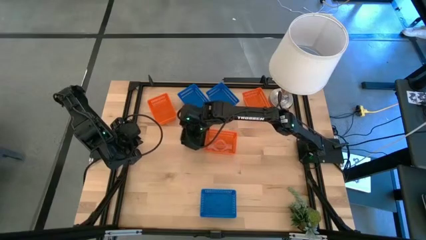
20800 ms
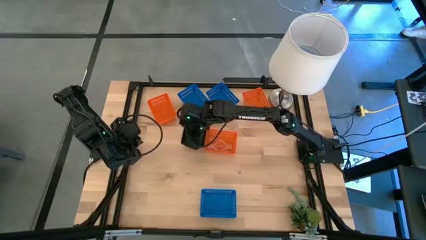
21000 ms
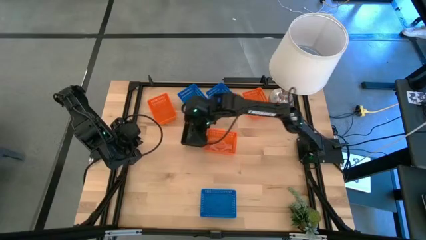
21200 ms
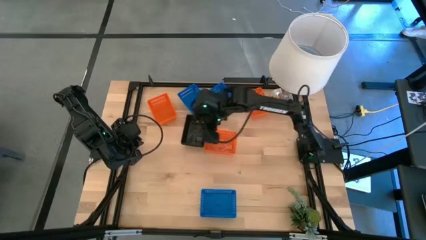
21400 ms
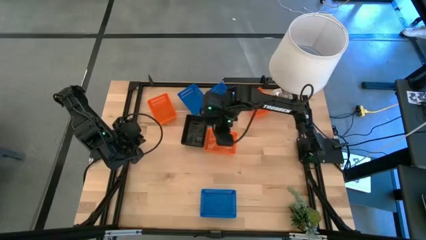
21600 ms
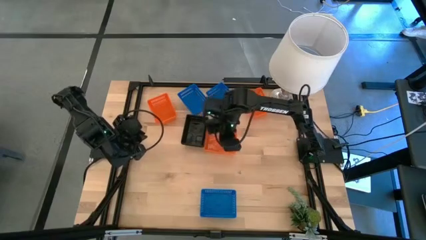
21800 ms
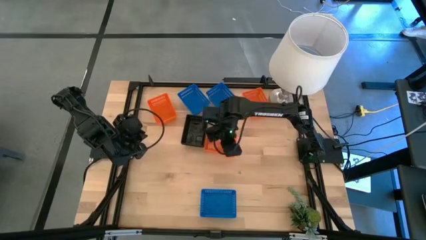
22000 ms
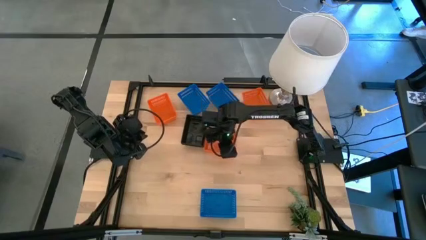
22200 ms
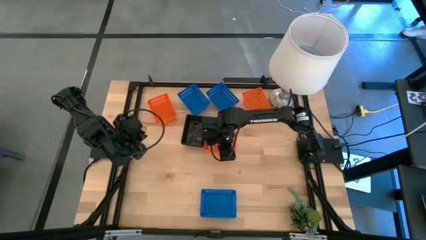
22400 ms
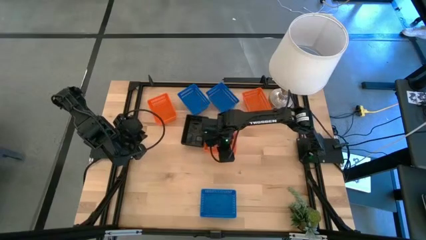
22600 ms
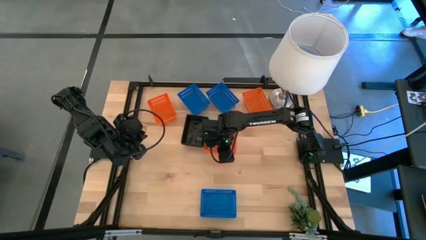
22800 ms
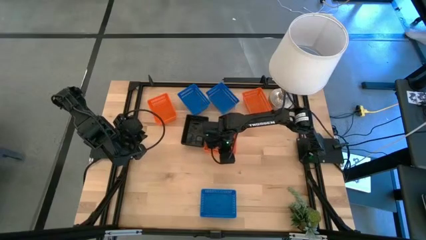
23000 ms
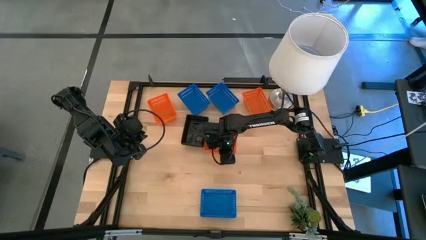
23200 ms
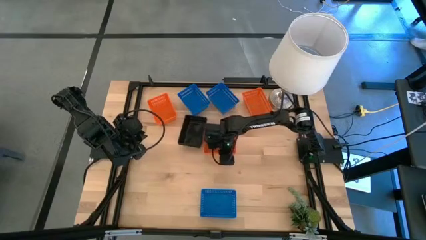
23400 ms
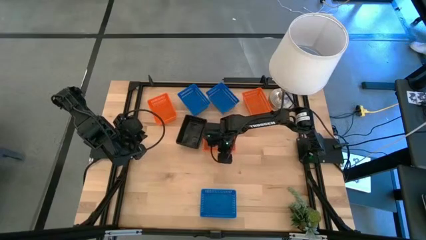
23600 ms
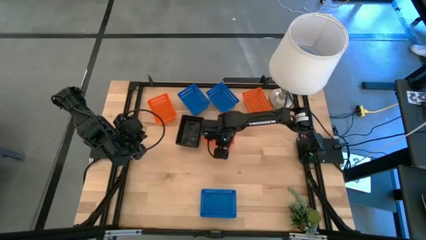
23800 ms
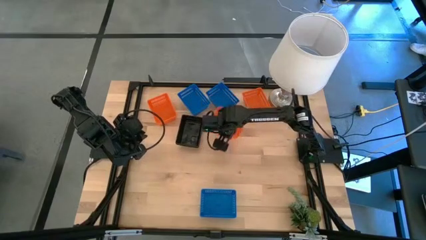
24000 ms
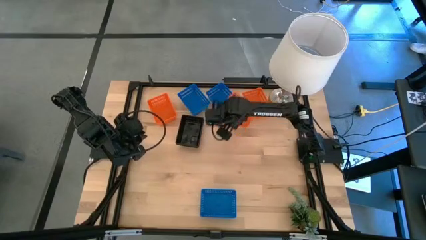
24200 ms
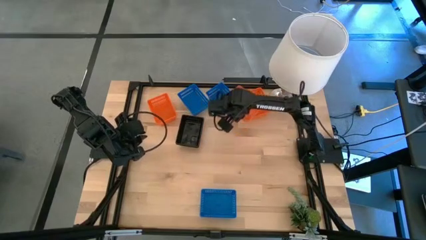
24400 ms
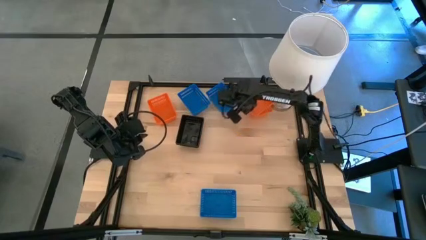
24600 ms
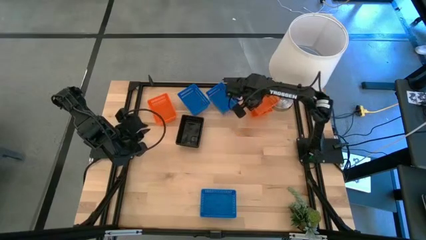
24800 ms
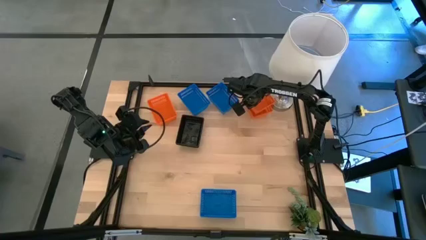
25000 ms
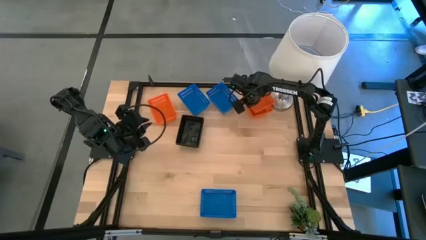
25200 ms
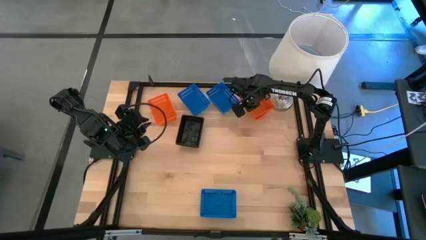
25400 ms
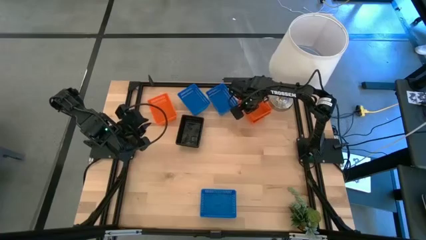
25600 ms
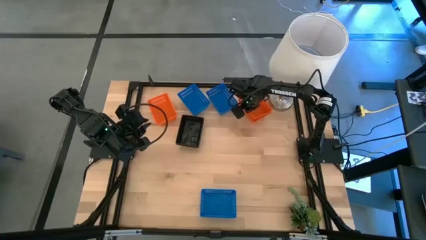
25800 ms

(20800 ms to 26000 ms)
Stack the center orange basket bin on top of the top right orange basket bin

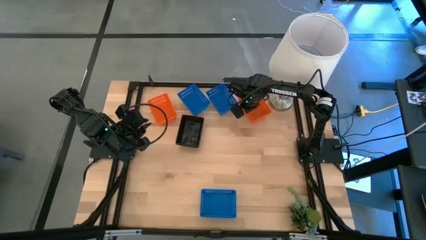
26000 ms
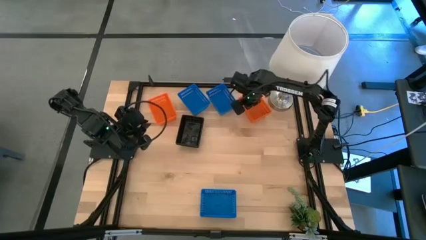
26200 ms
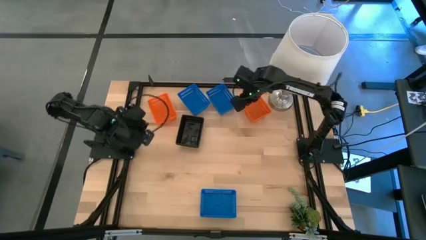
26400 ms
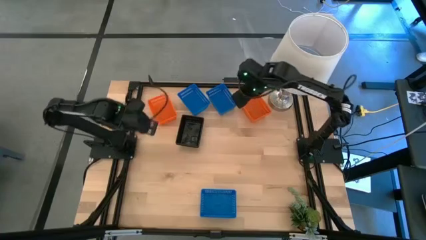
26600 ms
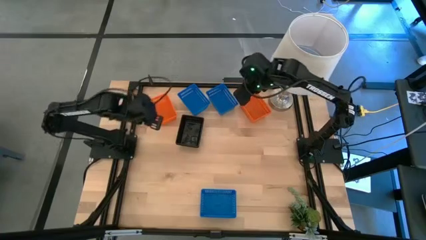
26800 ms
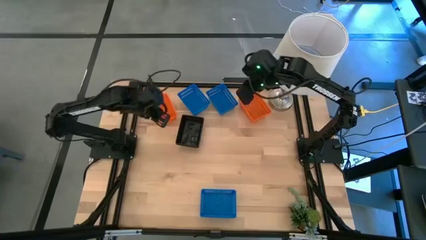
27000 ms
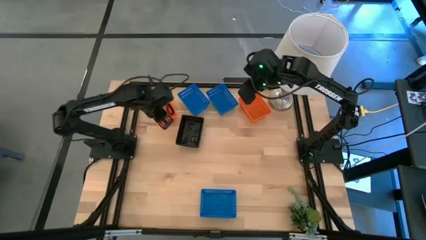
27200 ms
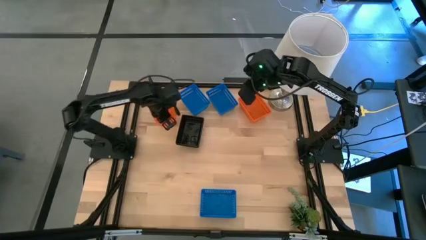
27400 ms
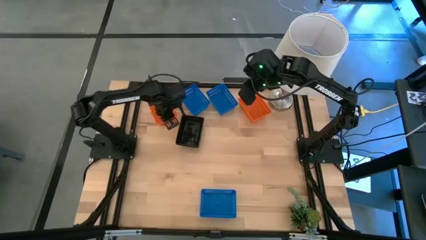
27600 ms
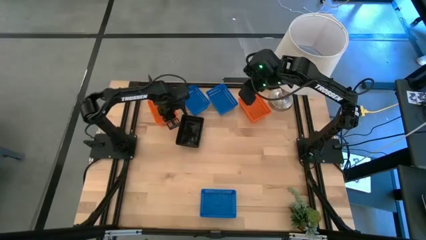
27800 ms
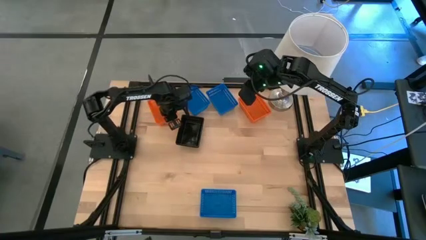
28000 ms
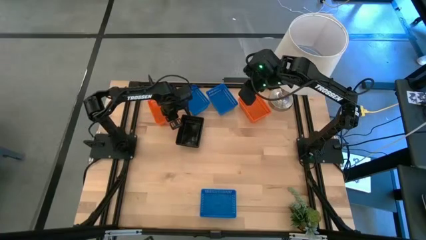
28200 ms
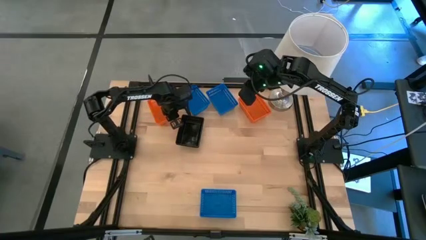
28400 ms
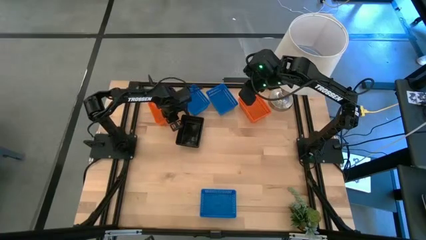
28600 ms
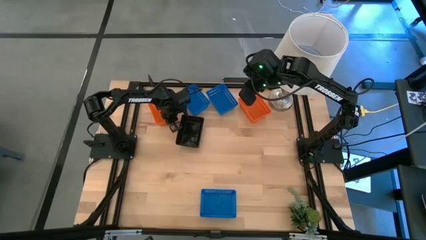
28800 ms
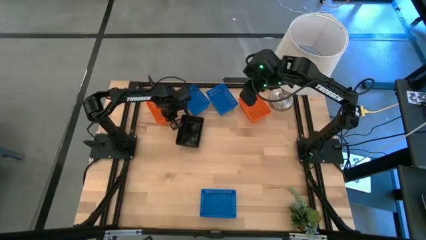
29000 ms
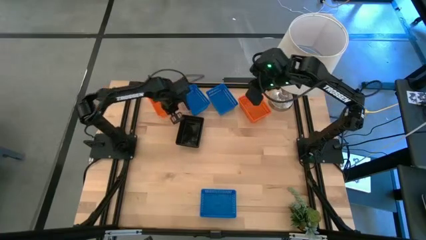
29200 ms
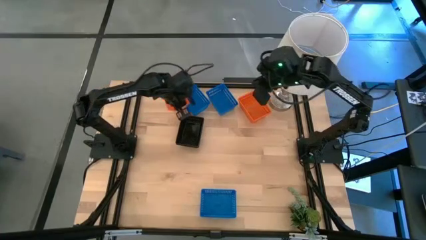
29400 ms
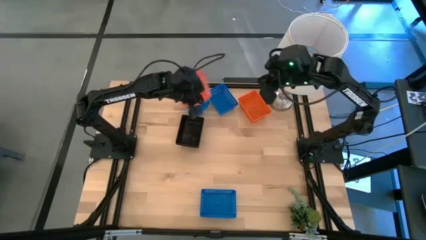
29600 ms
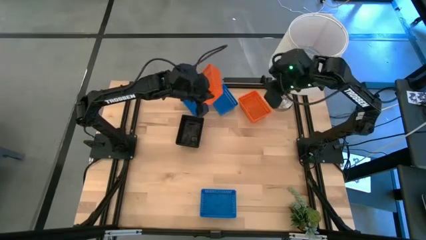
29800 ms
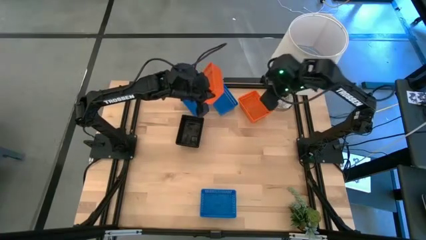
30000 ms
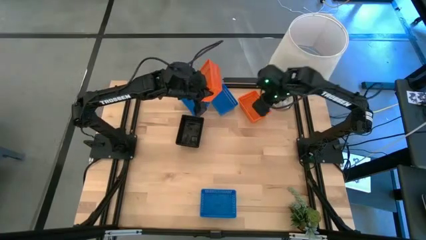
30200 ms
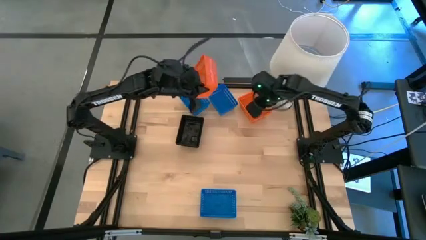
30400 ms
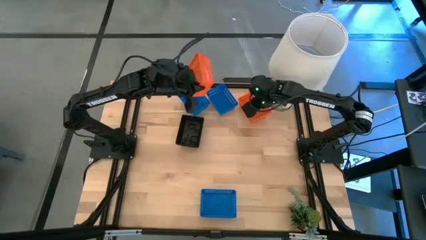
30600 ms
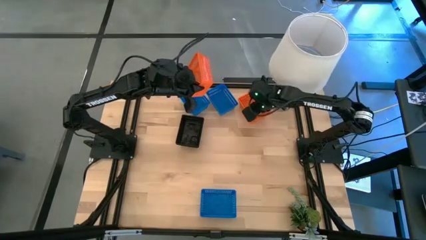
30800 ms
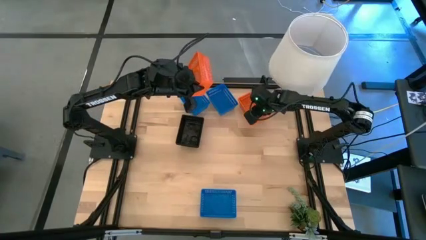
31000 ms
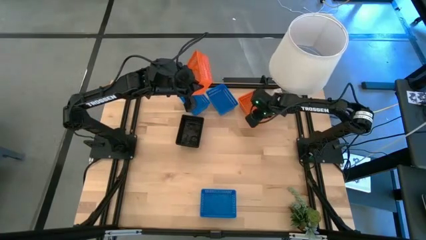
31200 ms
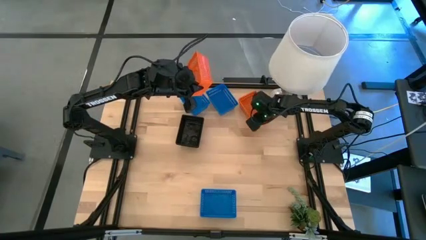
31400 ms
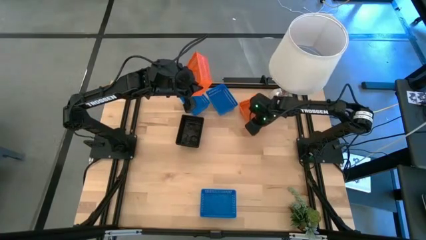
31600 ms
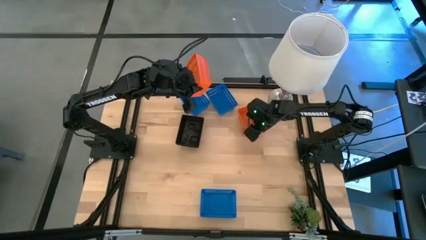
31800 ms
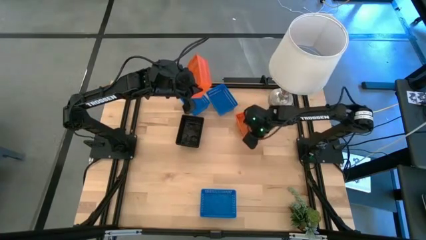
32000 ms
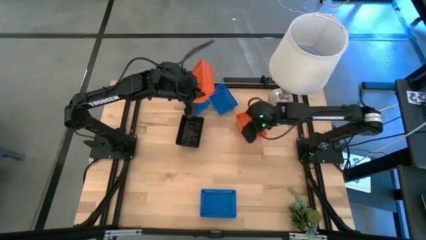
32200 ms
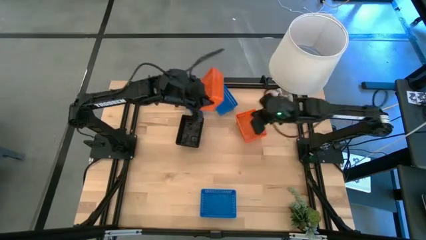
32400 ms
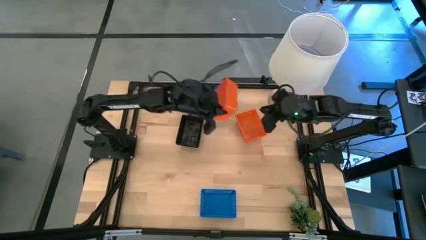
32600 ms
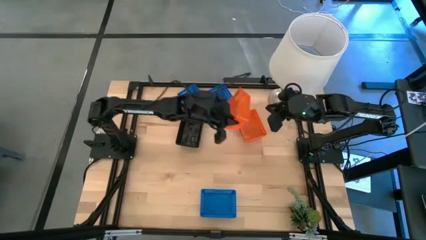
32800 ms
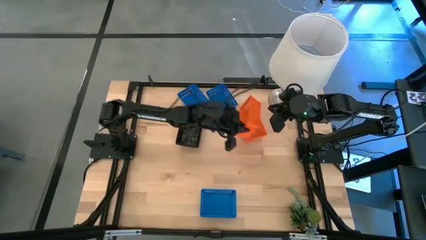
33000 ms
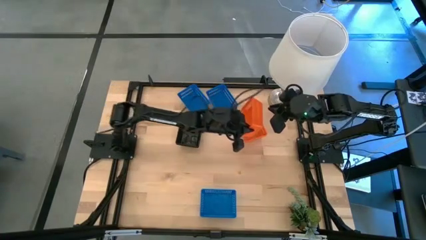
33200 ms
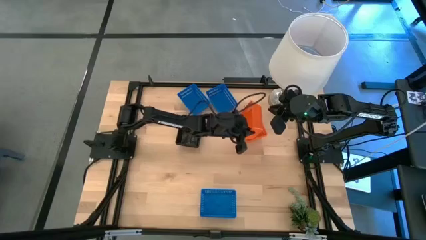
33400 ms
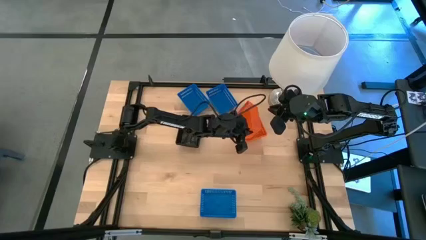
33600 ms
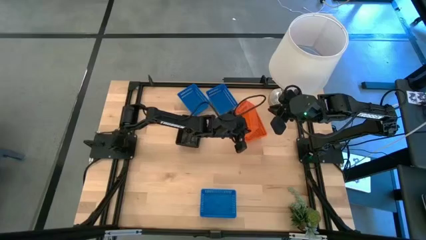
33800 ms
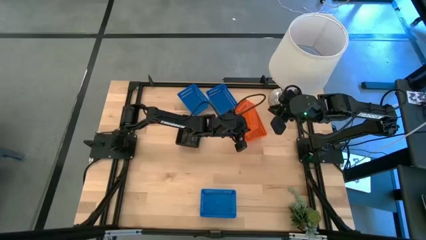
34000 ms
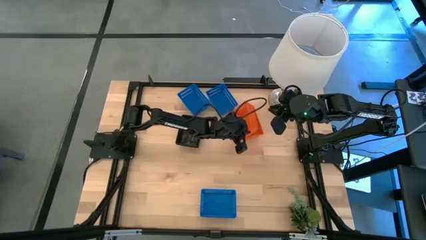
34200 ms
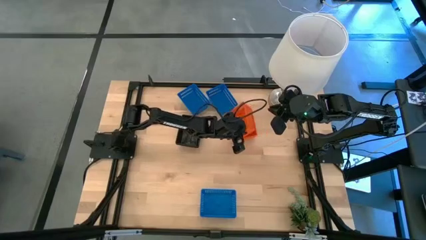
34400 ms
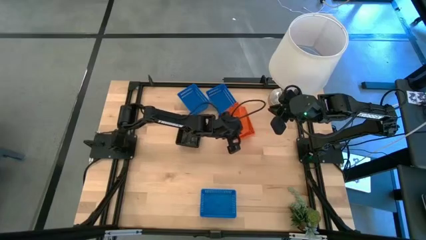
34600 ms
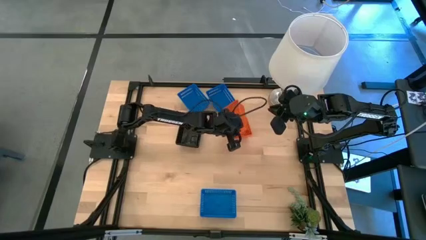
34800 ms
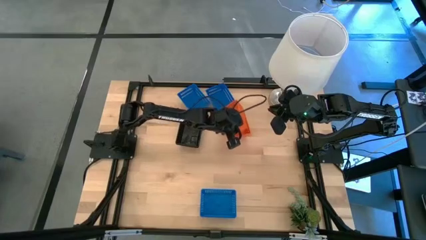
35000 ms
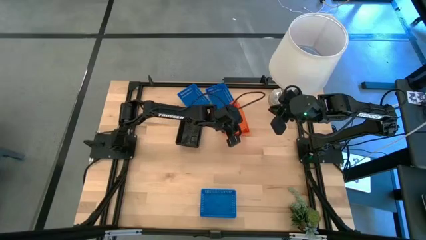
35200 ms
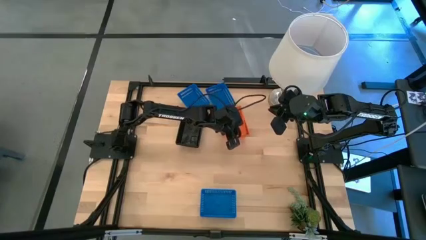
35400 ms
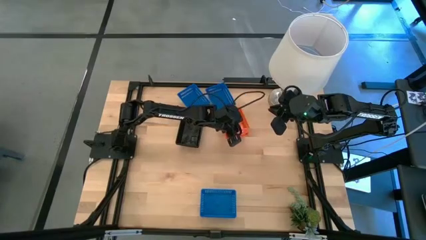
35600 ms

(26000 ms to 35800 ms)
Stack the left orange basket bin on top of the right orange basket bin
